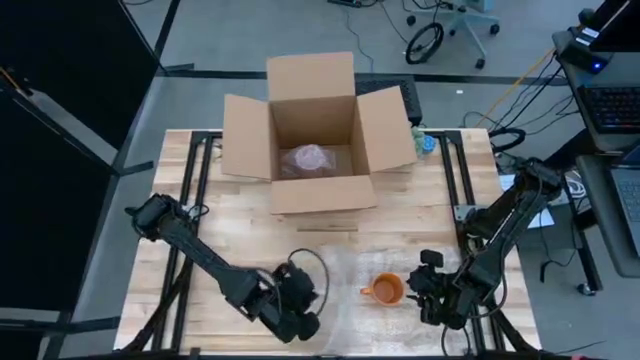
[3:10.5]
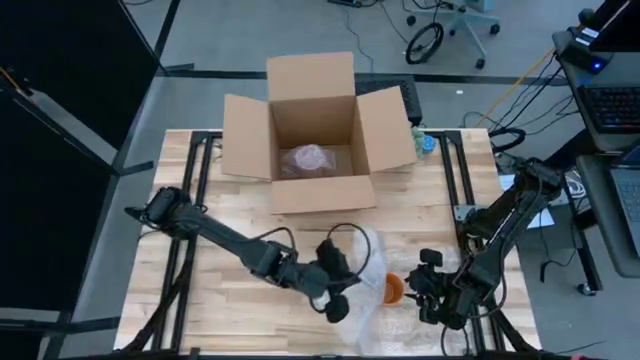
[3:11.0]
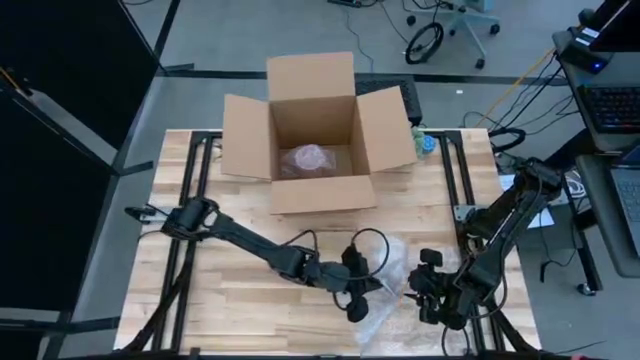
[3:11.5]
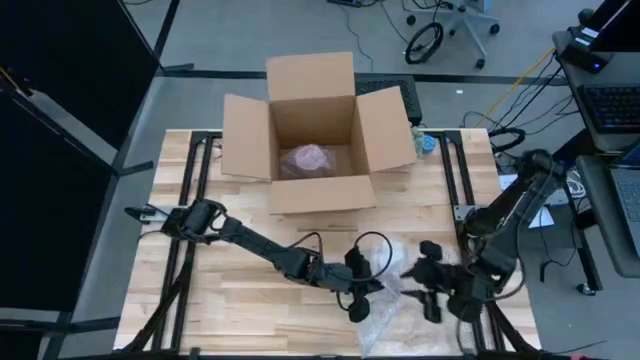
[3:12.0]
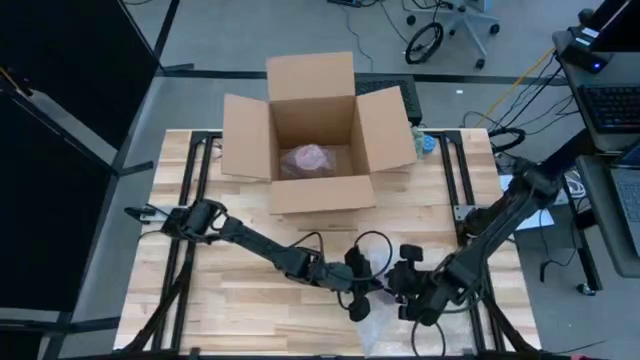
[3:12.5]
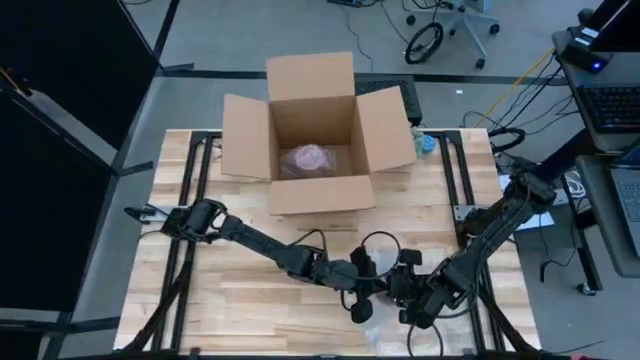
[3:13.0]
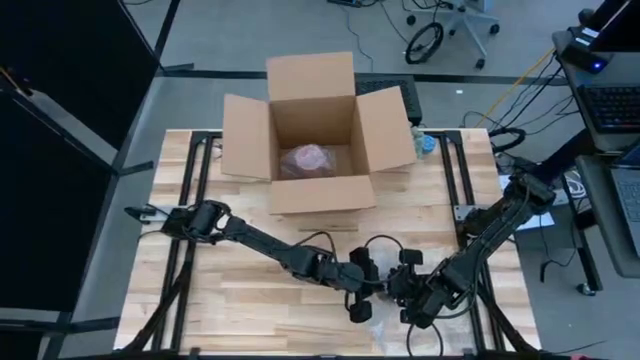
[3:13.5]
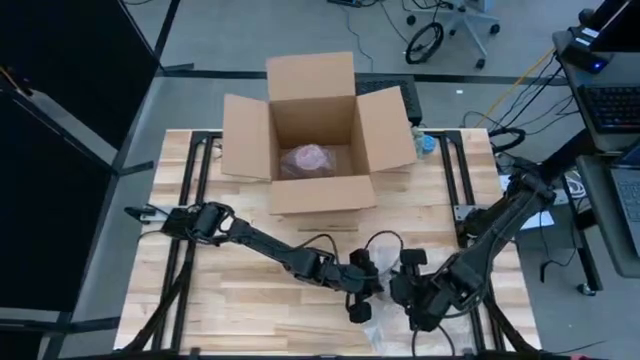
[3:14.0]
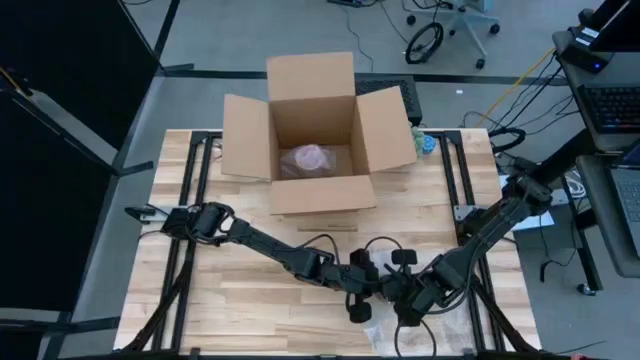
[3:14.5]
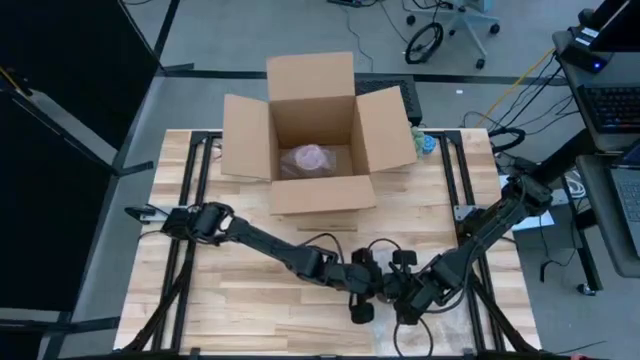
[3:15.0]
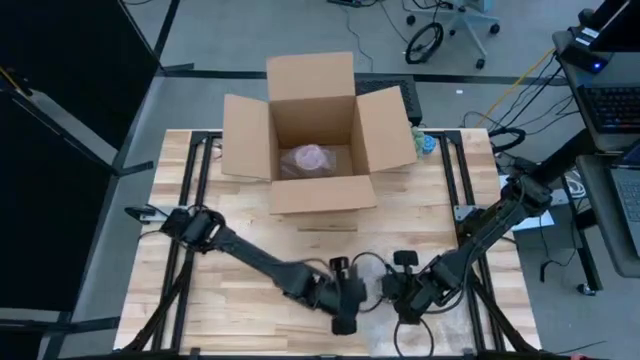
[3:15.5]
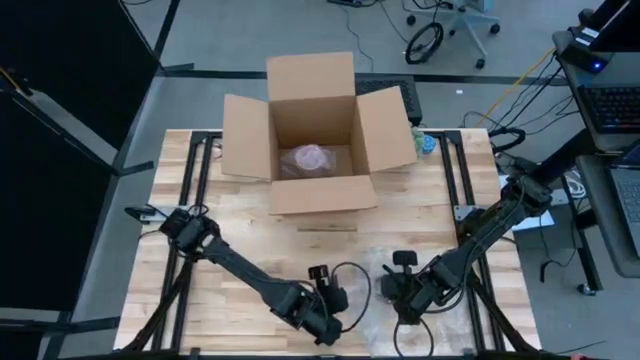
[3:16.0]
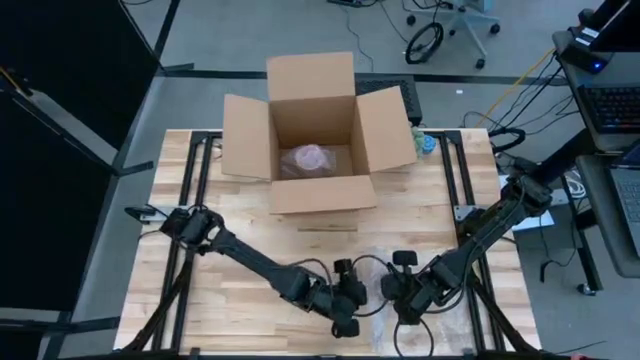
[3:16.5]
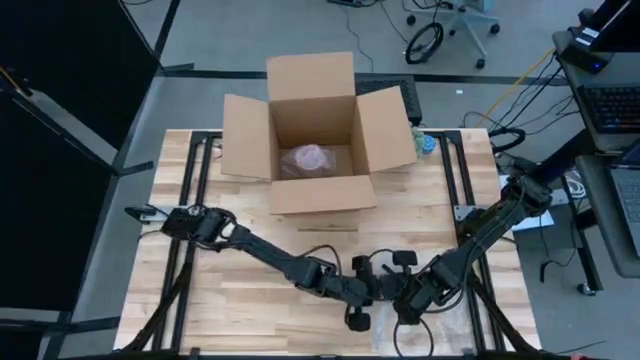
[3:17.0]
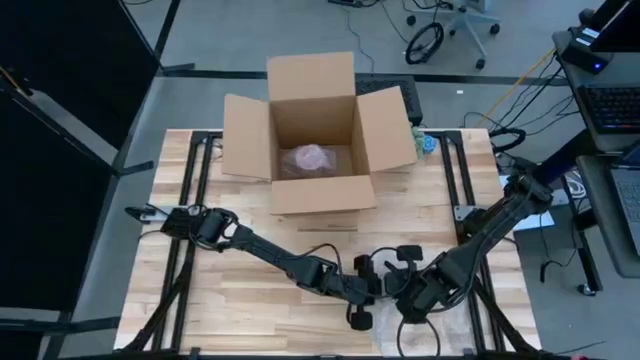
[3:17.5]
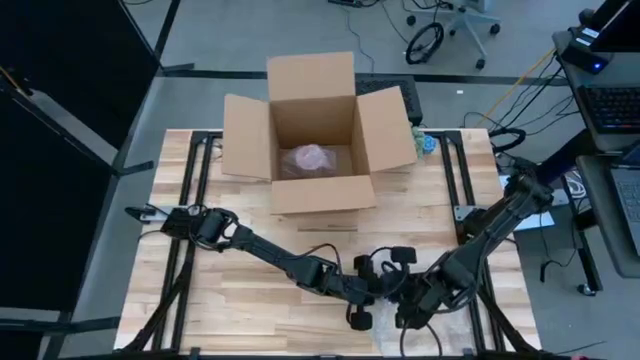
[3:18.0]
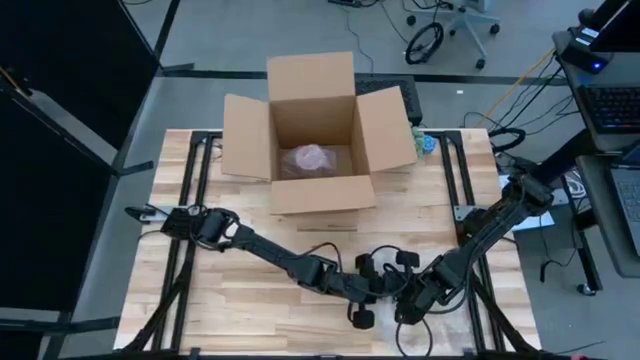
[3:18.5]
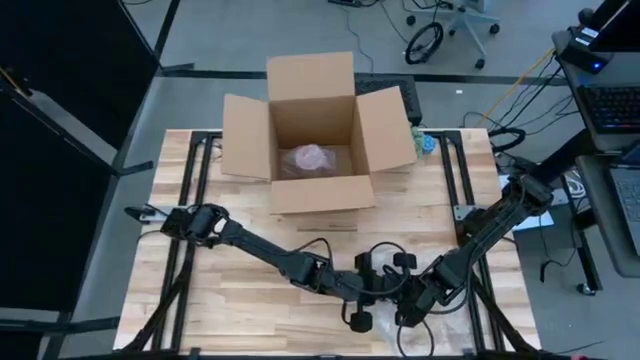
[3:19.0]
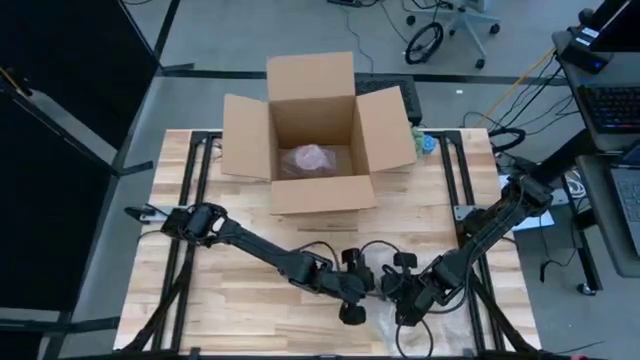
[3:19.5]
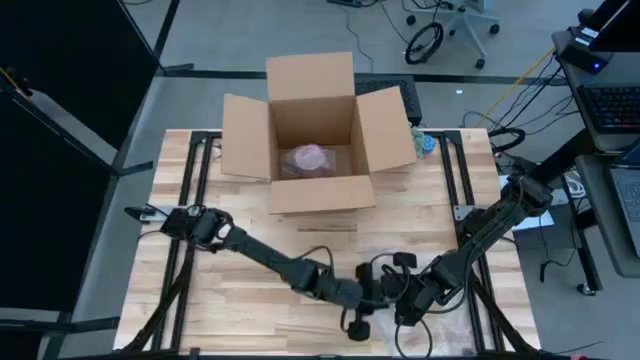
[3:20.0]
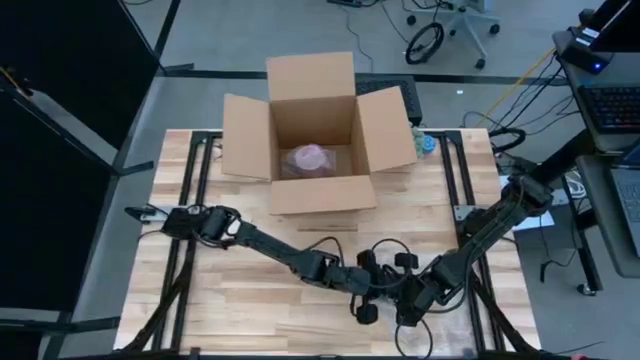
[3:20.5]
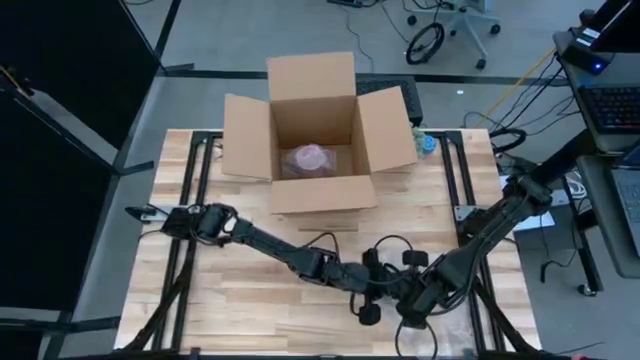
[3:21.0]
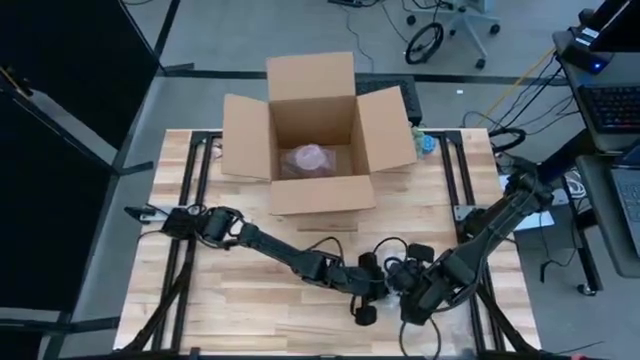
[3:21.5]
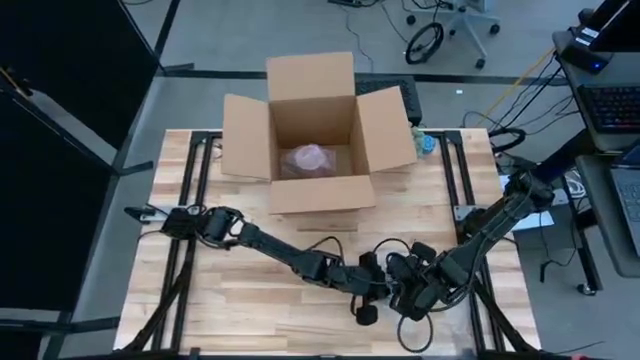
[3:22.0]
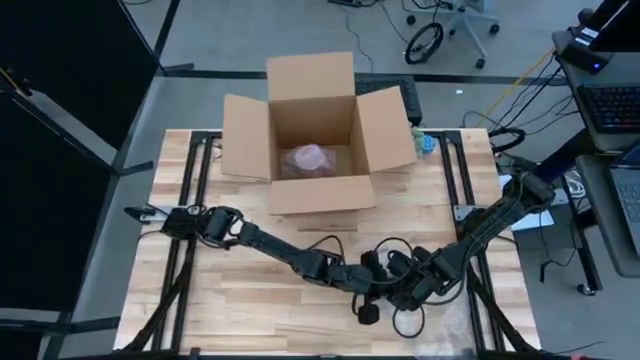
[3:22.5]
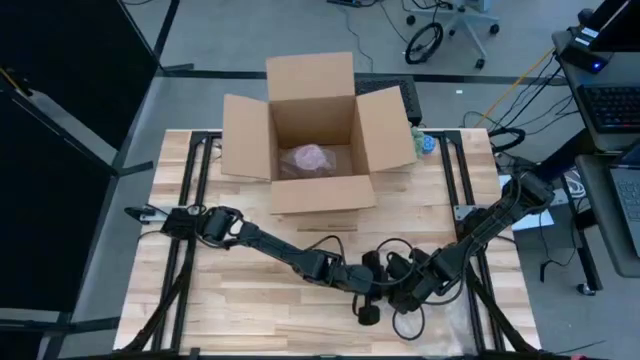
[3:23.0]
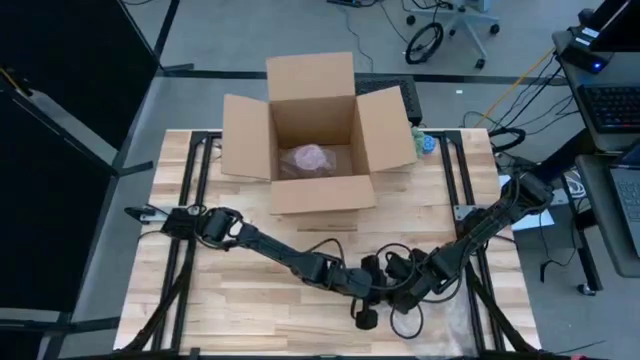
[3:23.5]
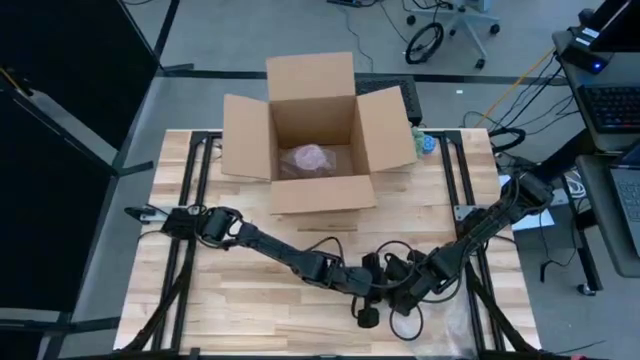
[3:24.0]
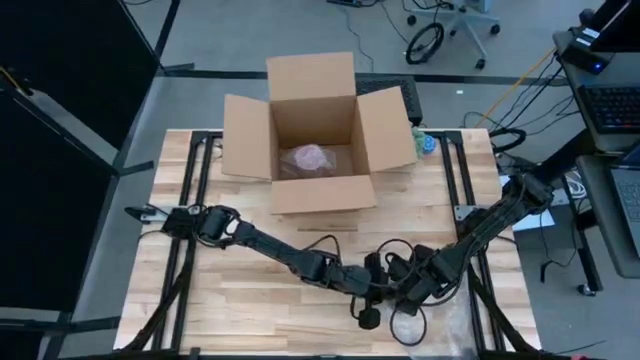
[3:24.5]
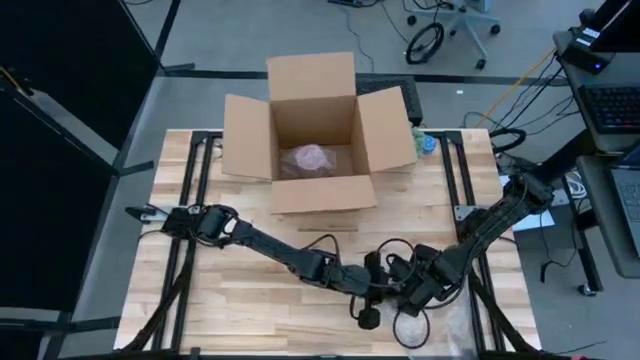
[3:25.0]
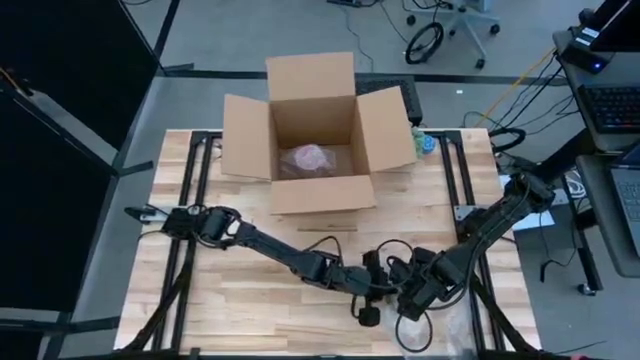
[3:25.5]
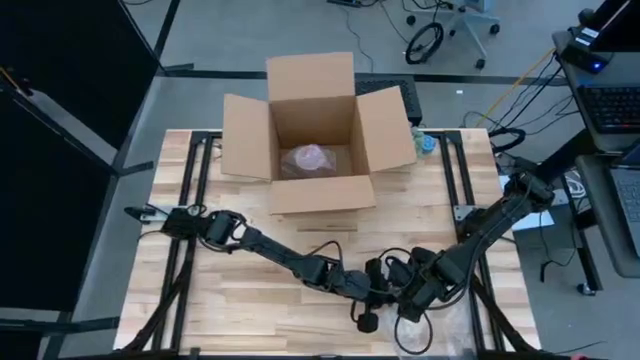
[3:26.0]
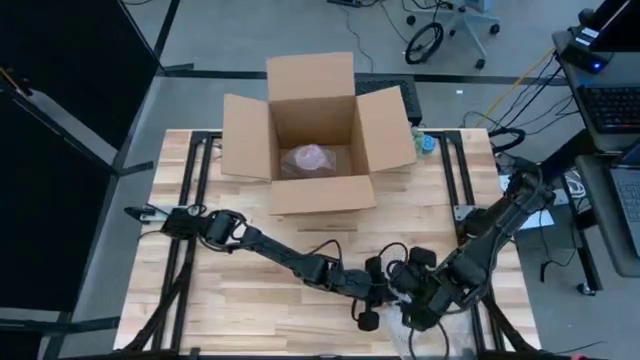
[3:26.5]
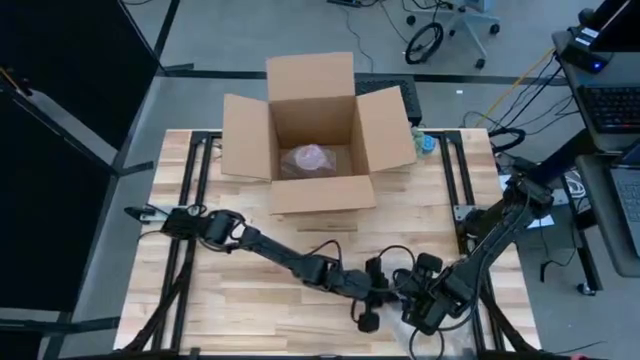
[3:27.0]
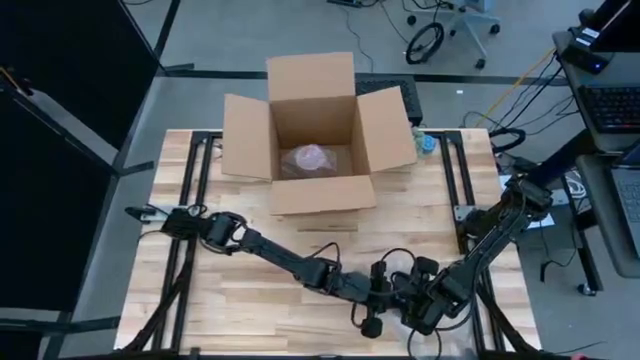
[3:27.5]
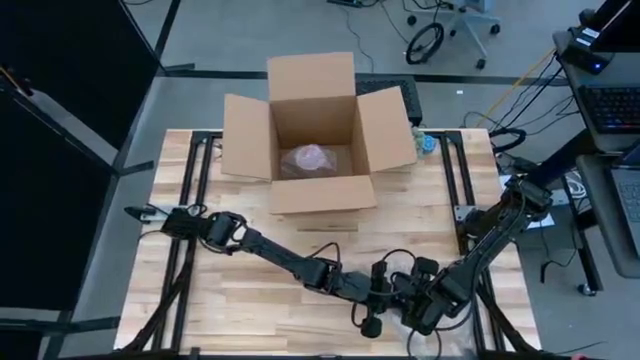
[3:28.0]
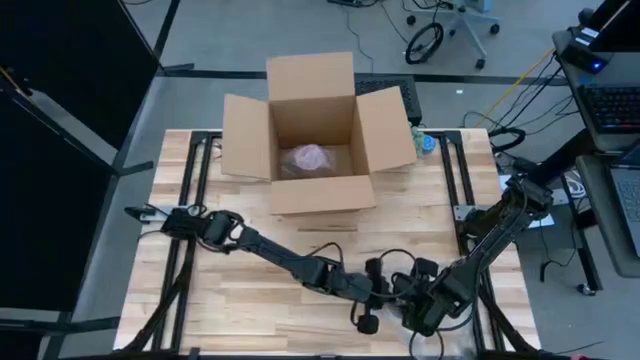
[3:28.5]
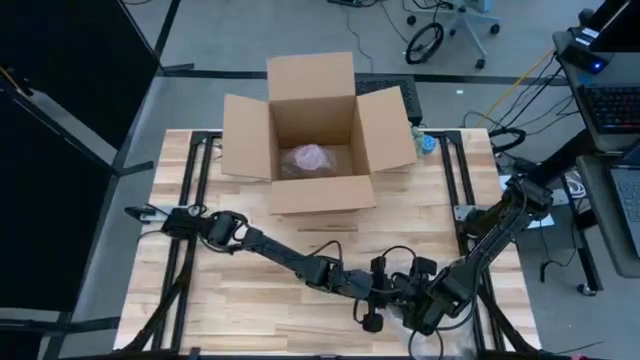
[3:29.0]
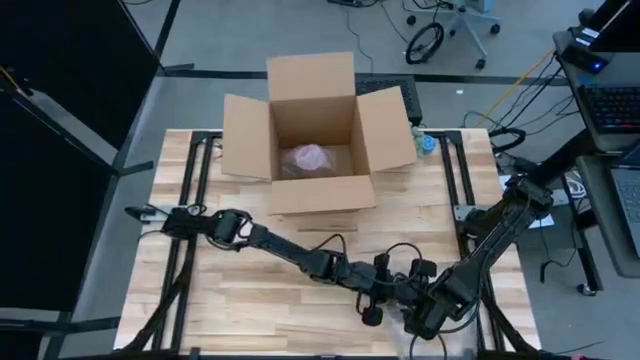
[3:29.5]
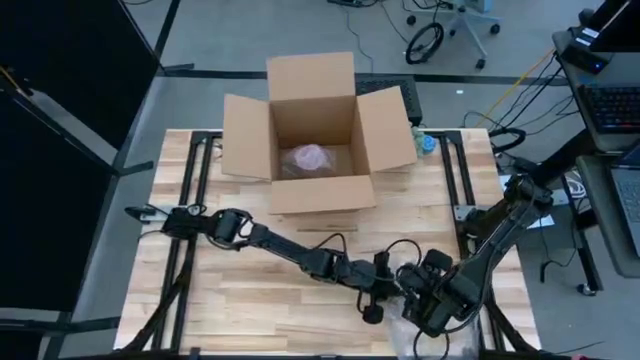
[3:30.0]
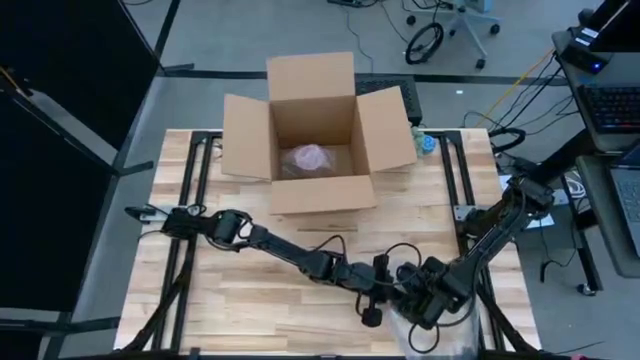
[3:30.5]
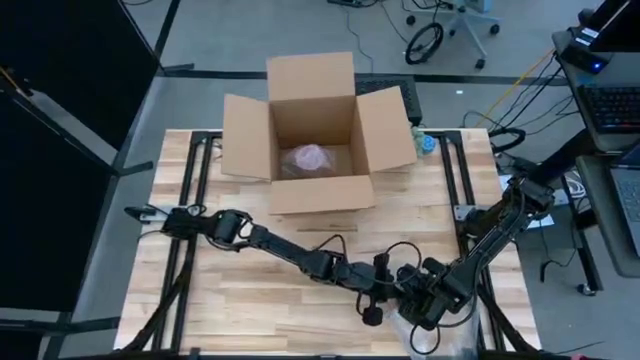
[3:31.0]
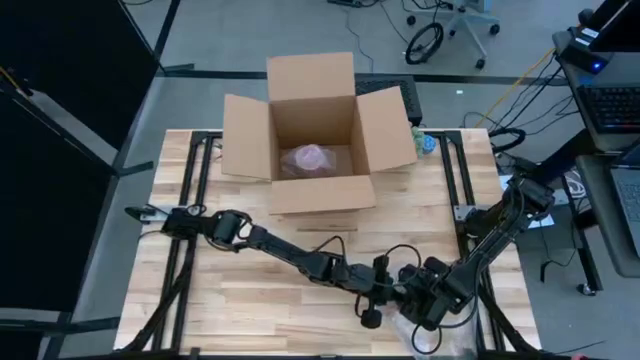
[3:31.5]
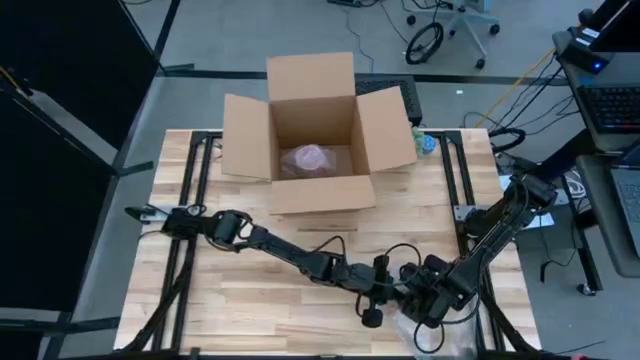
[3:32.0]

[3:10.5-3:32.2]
Task: wrap mug
Wrap the pink mug with transparent bubble wrap
